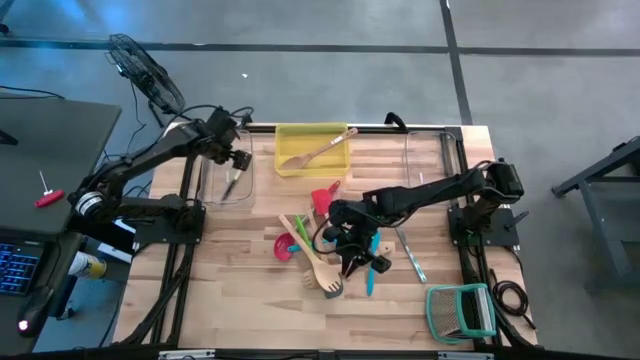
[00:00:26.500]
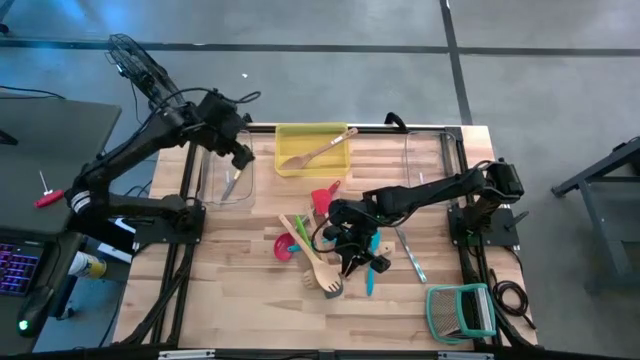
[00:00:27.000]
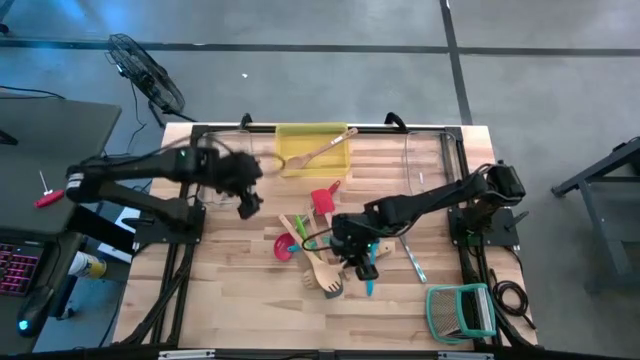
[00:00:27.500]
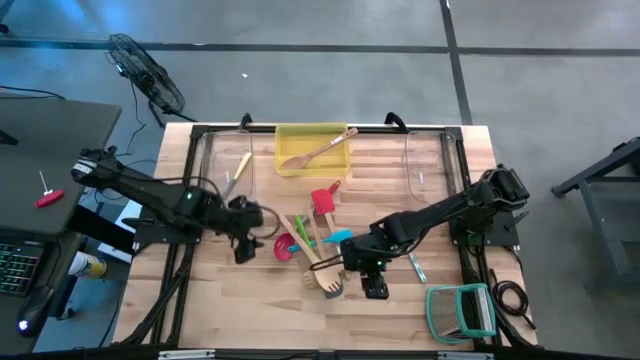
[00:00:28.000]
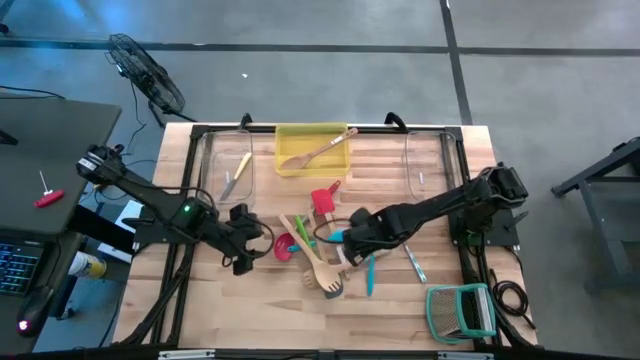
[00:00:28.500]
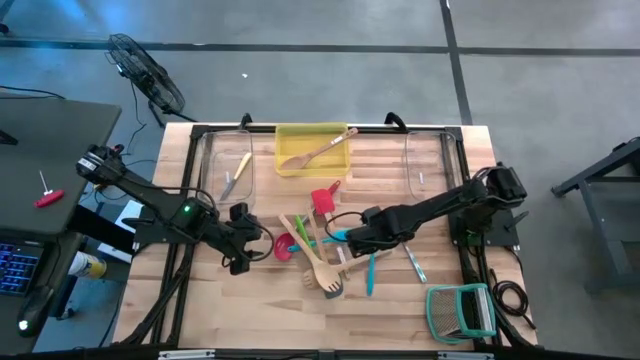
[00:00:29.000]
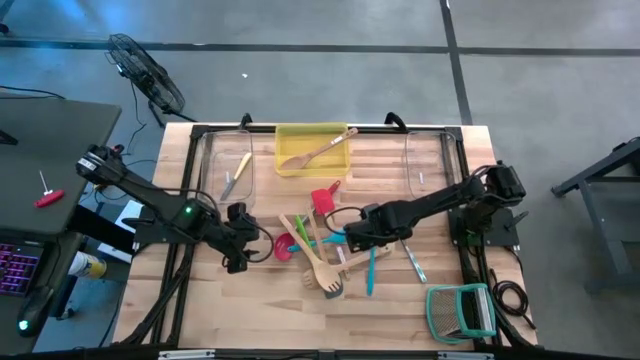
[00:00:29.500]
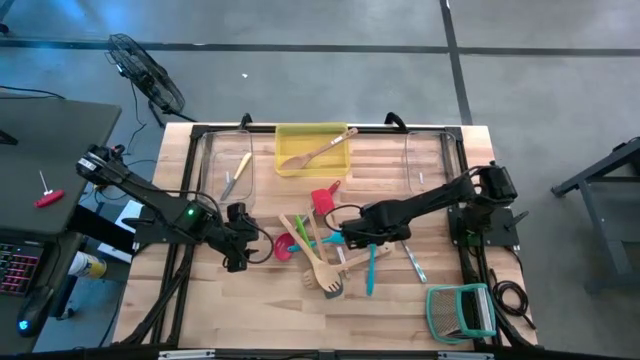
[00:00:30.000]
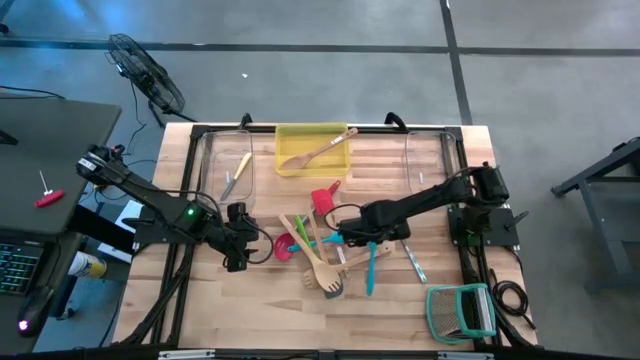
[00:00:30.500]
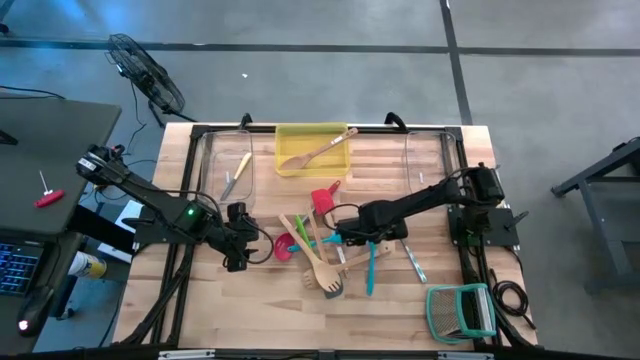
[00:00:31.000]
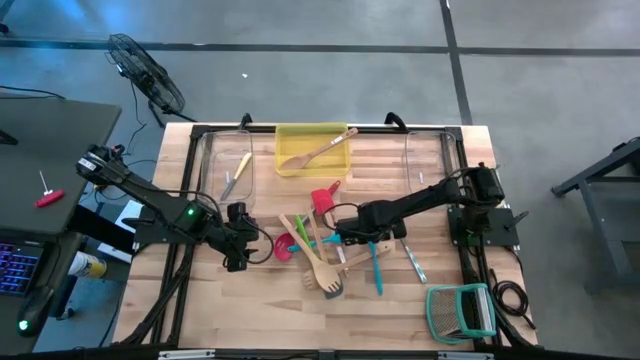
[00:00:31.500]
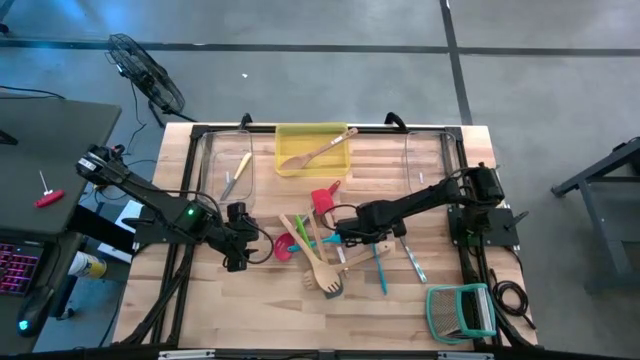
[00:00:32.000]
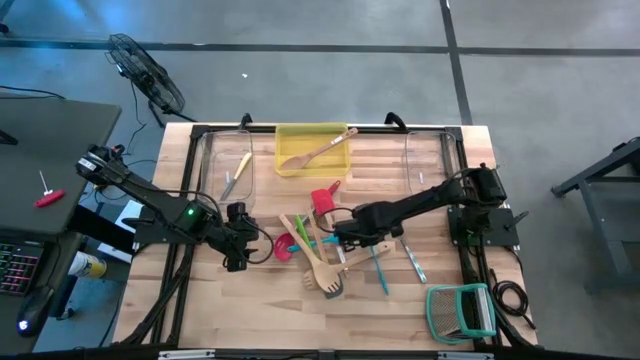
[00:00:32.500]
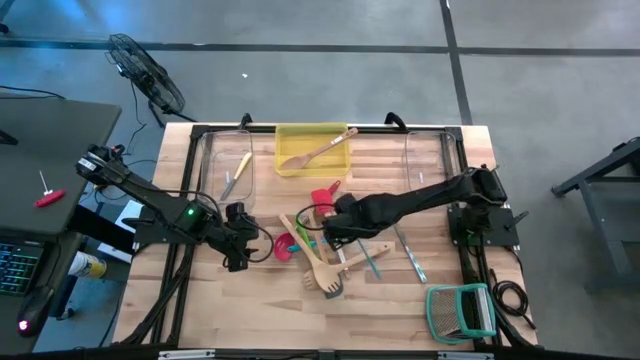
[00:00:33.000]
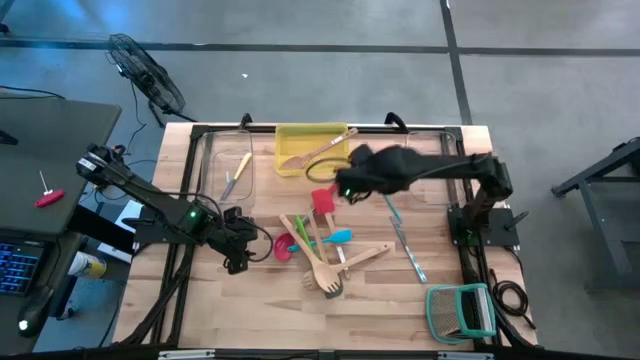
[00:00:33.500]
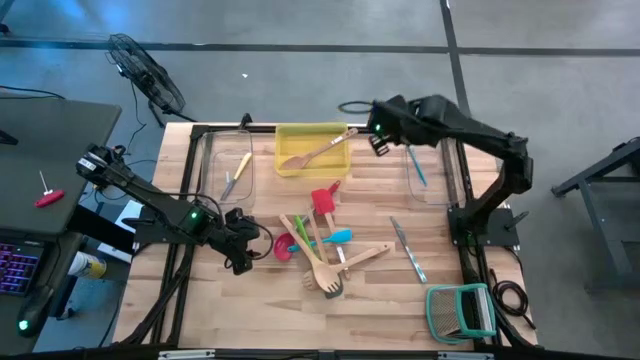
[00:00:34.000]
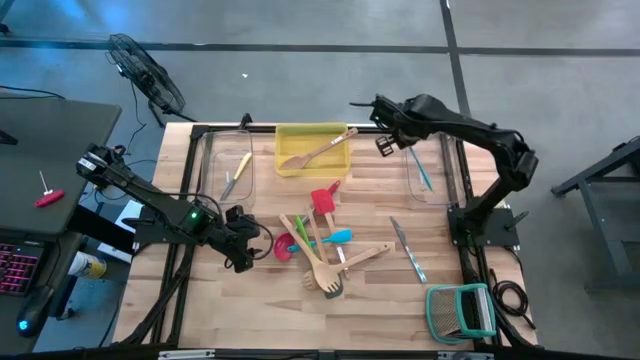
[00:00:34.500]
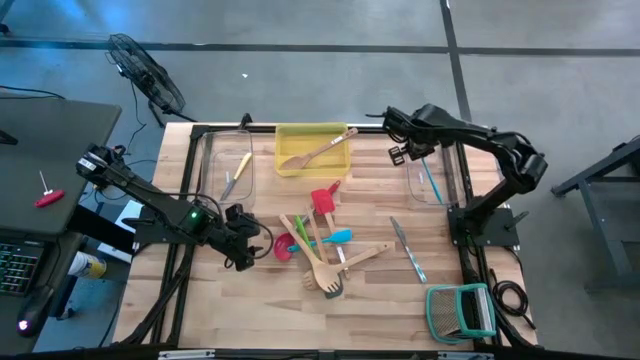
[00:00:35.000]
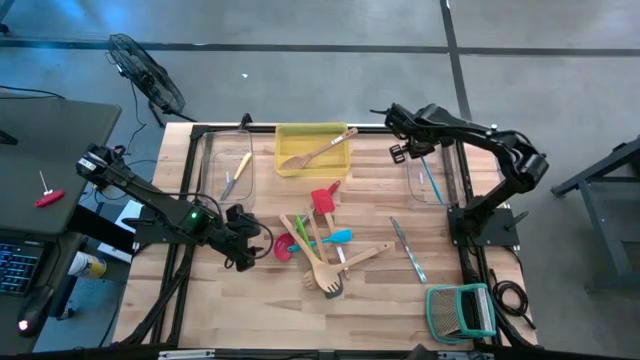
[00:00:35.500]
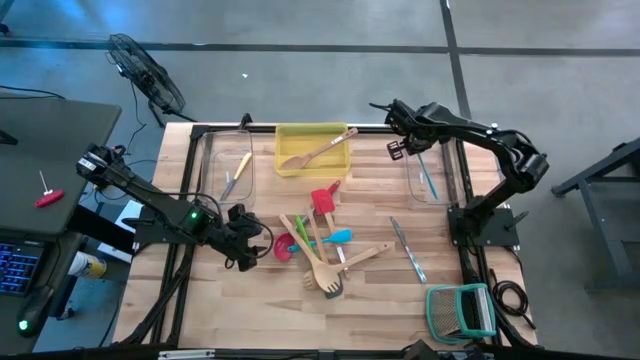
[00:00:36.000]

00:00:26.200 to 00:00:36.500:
Task: Pick & Place Kitchen Items
Put the blue spatula into the right transparent bin

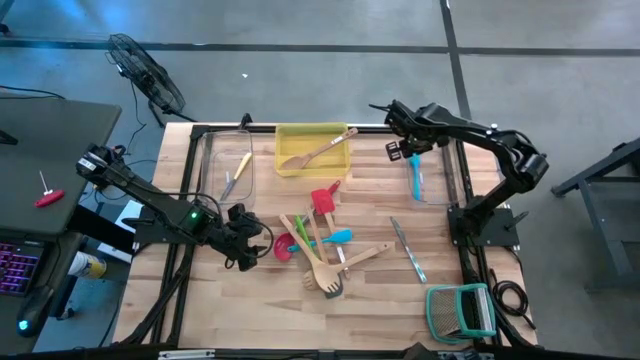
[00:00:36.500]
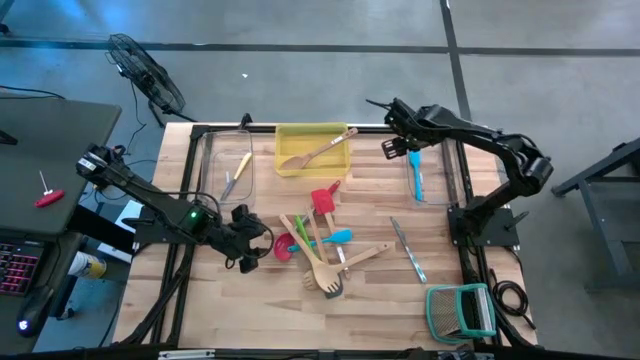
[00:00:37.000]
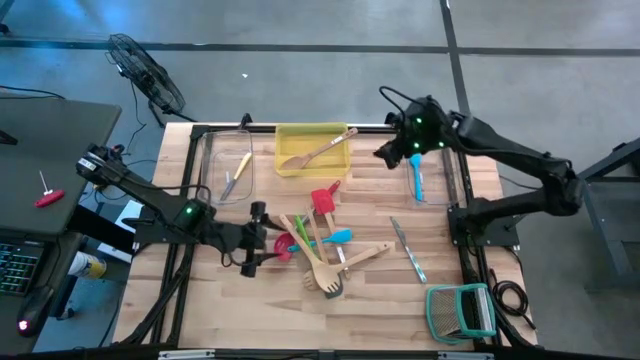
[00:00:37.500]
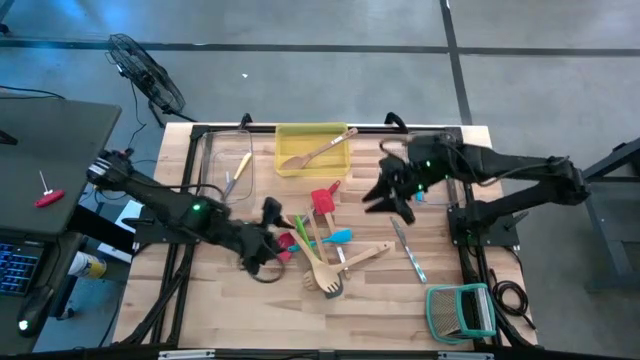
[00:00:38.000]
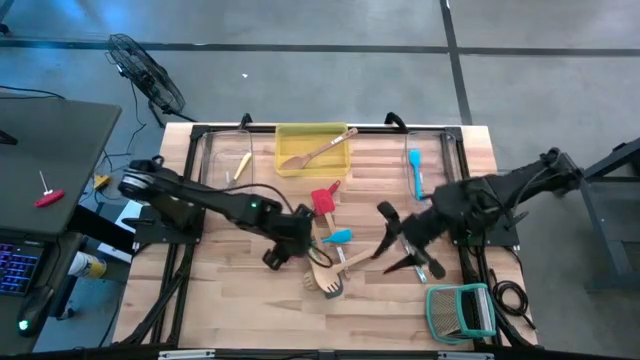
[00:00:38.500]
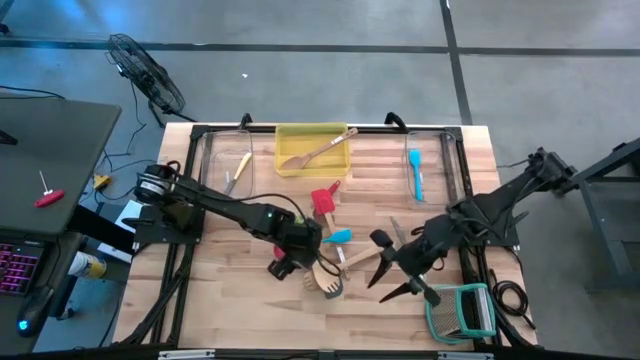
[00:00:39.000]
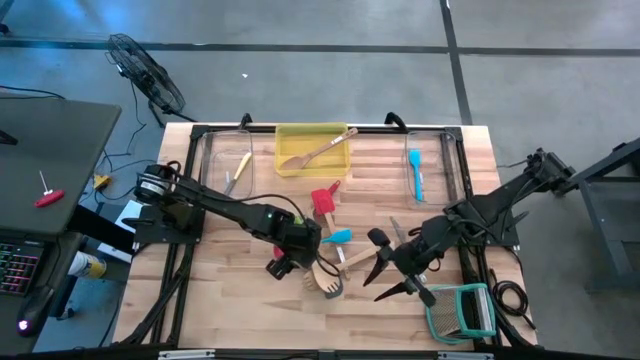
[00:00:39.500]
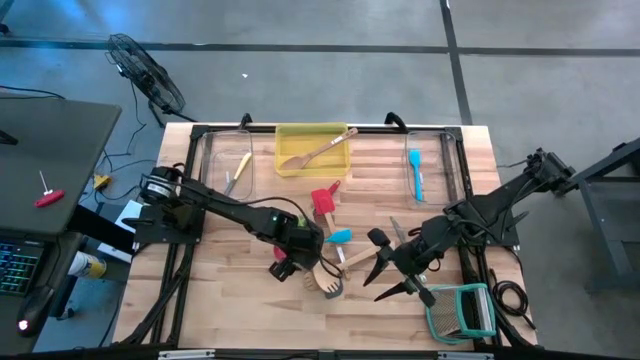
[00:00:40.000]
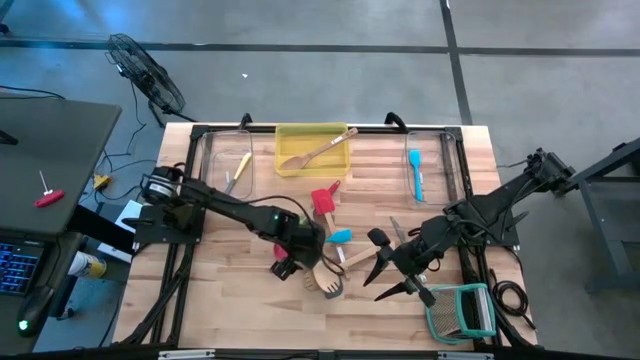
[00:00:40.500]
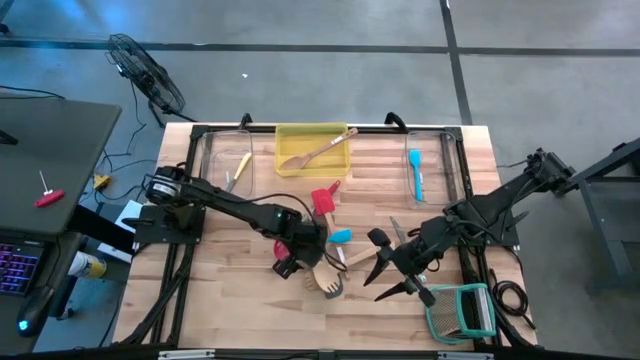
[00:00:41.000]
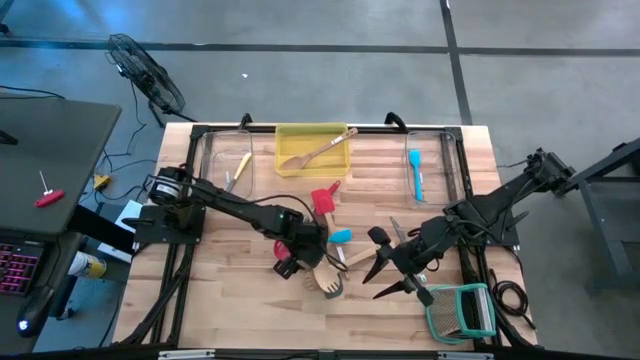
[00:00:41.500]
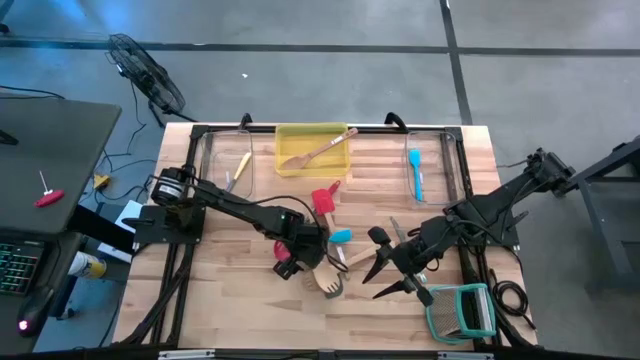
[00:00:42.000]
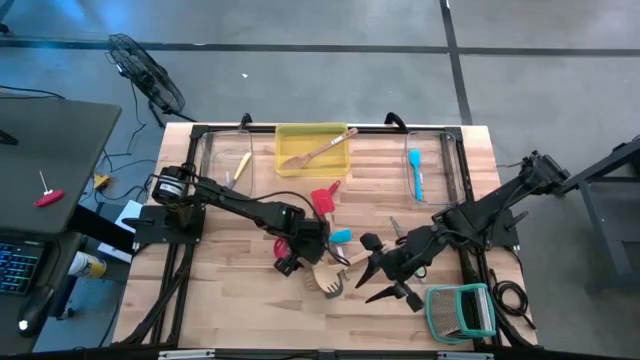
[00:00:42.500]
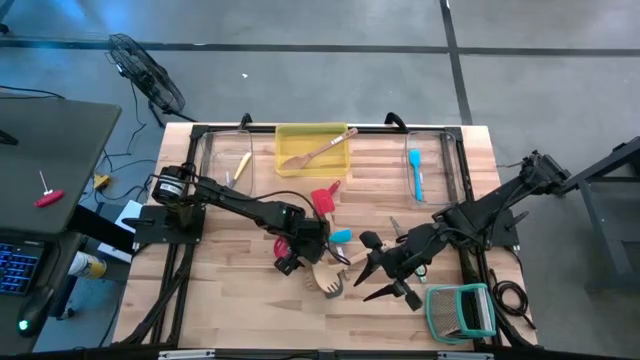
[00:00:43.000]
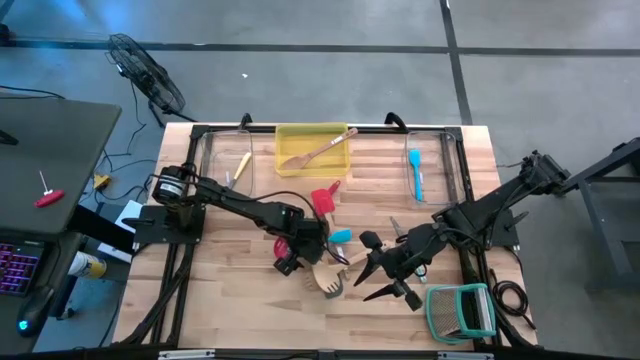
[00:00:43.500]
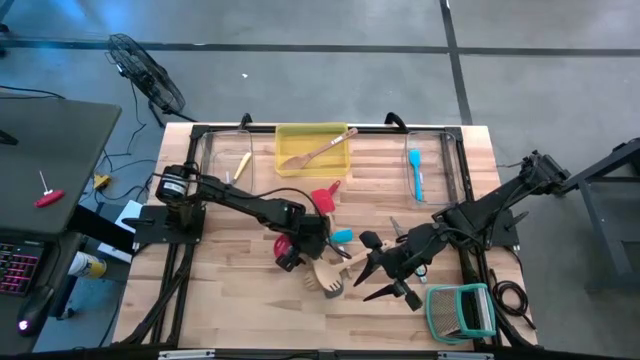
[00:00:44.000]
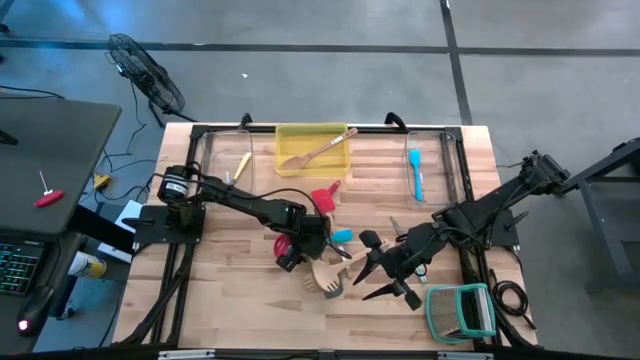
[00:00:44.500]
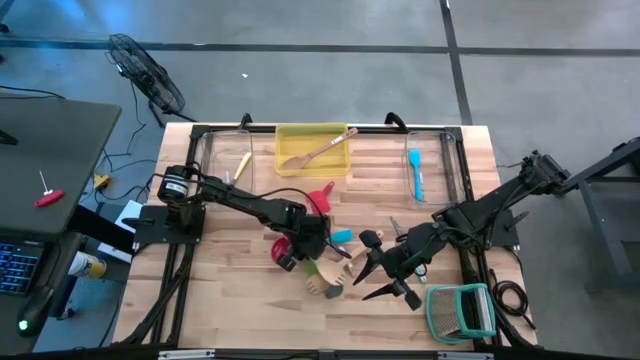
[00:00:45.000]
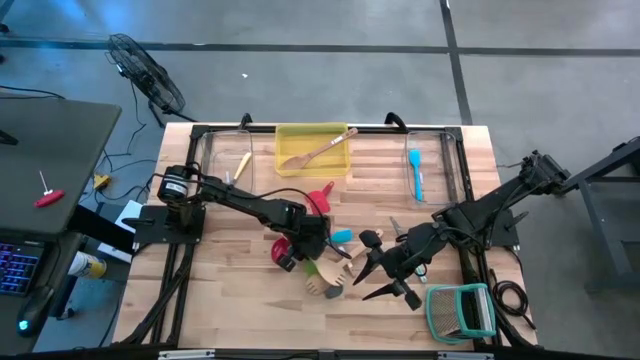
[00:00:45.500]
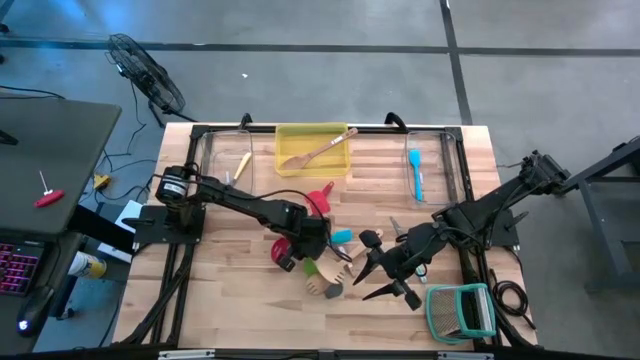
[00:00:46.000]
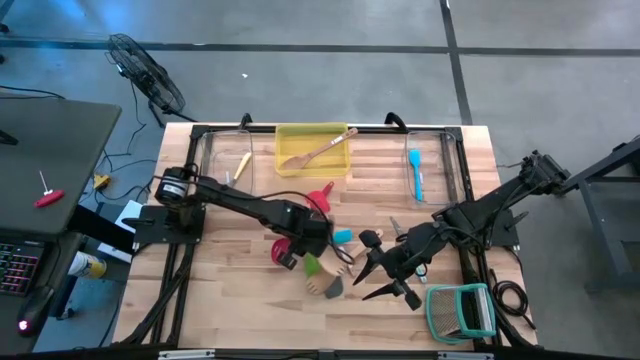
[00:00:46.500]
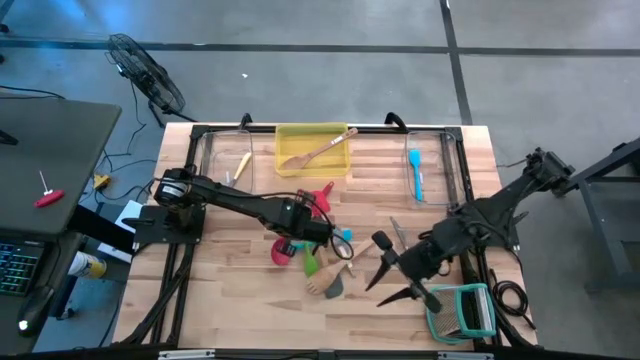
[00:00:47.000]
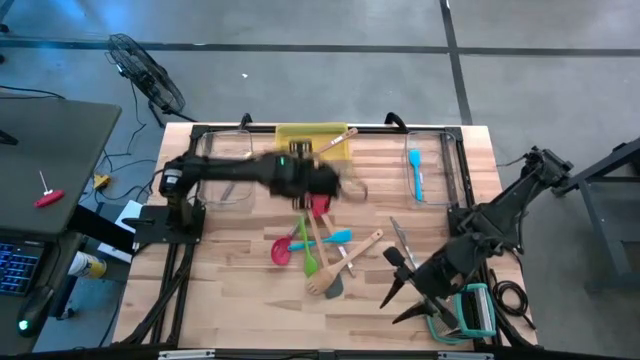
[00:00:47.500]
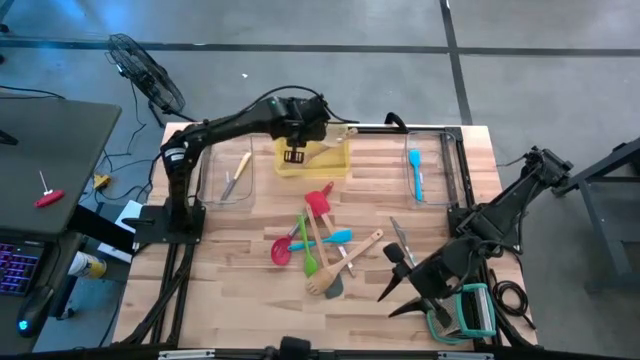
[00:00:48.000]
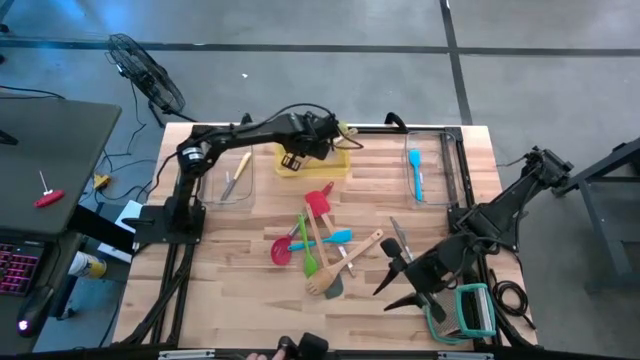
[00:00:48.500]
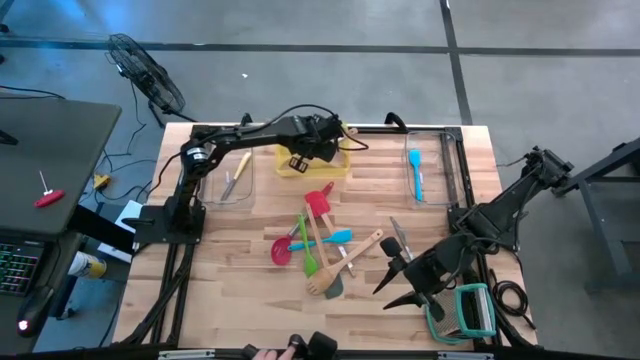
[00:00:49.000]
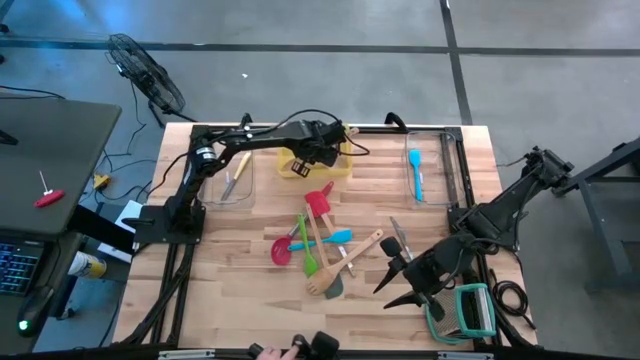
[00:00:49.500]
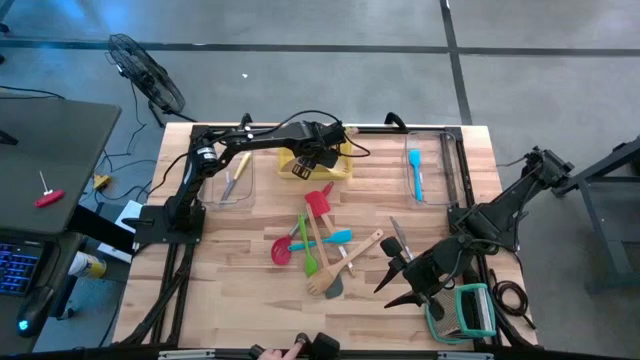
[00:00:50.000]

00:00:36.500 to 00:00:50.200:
Put the wooden serving spoon into the yellow bin
